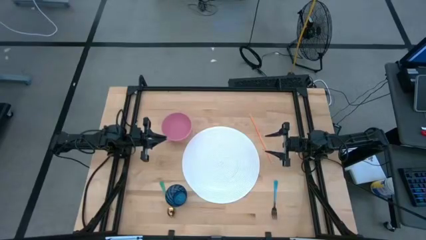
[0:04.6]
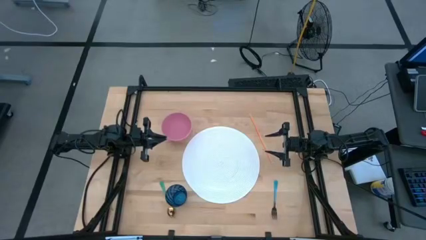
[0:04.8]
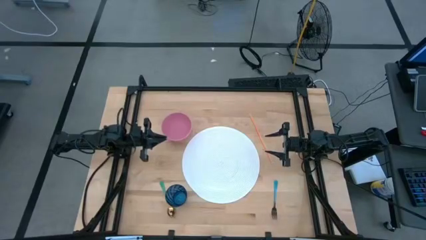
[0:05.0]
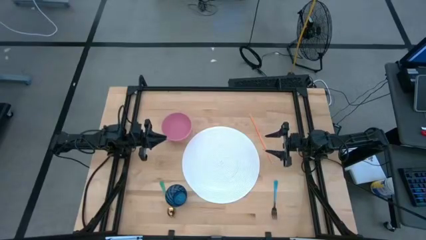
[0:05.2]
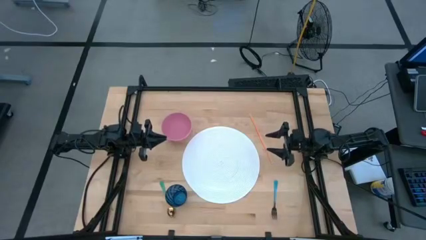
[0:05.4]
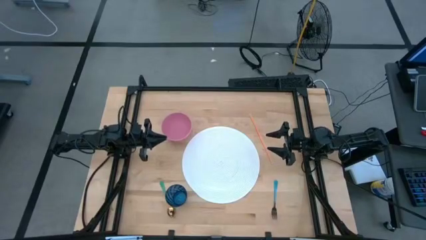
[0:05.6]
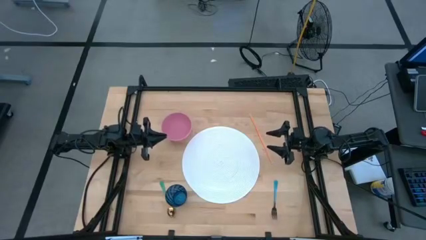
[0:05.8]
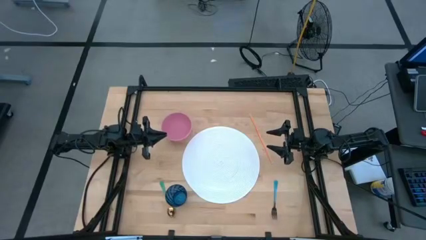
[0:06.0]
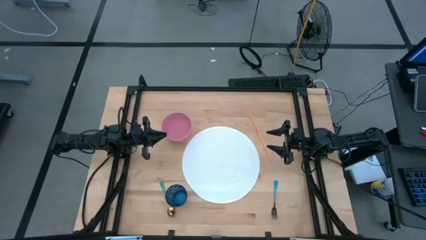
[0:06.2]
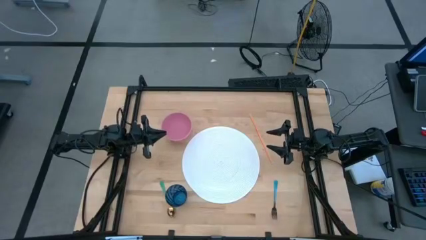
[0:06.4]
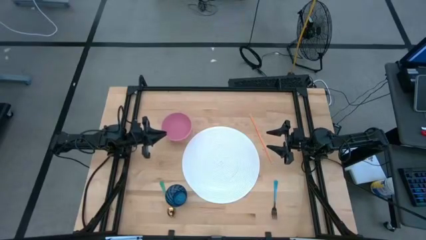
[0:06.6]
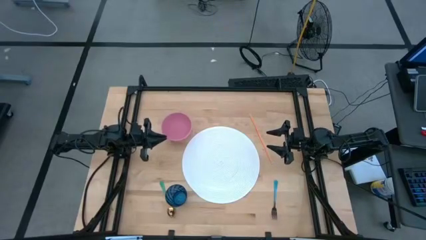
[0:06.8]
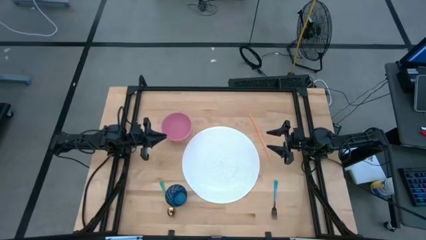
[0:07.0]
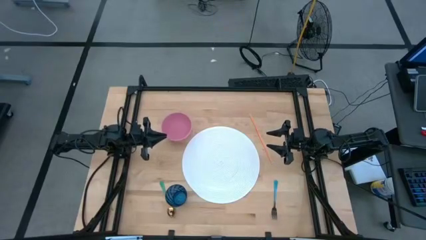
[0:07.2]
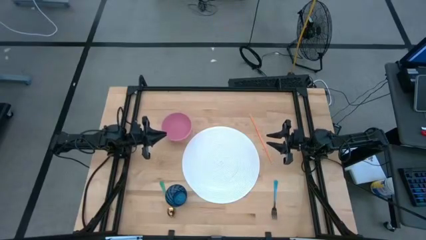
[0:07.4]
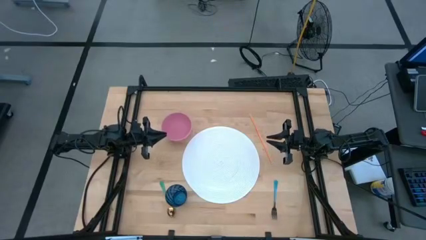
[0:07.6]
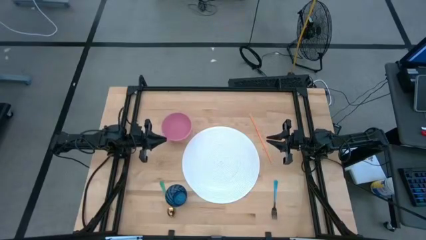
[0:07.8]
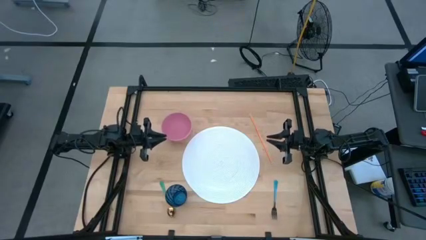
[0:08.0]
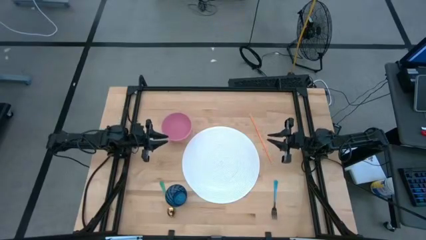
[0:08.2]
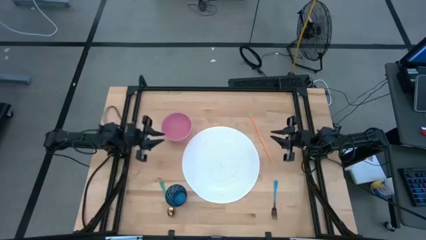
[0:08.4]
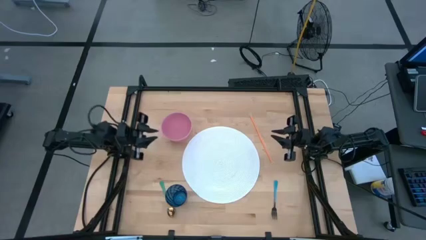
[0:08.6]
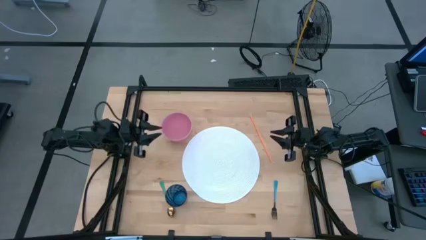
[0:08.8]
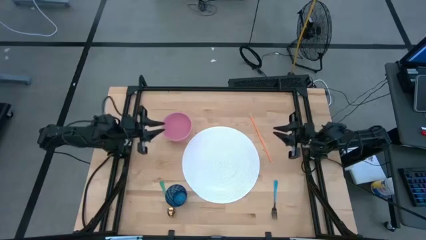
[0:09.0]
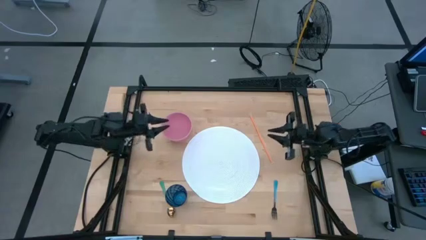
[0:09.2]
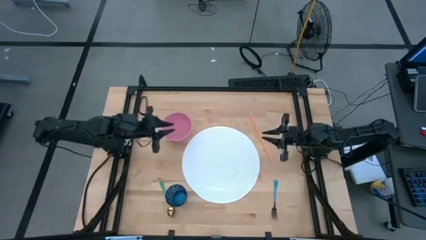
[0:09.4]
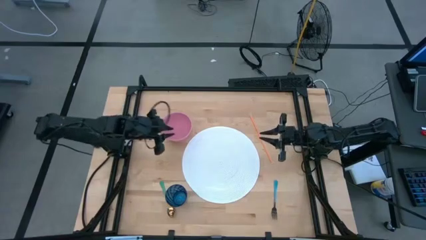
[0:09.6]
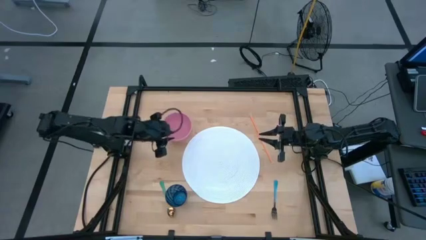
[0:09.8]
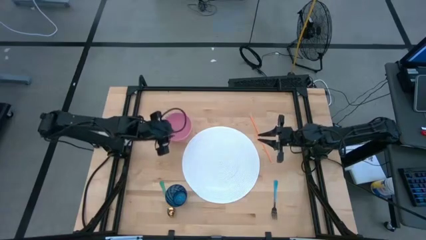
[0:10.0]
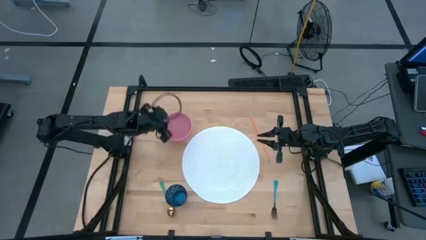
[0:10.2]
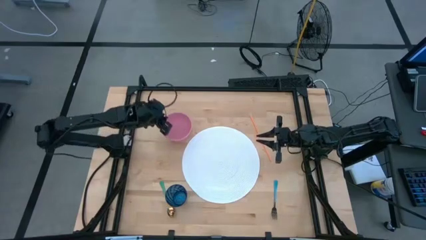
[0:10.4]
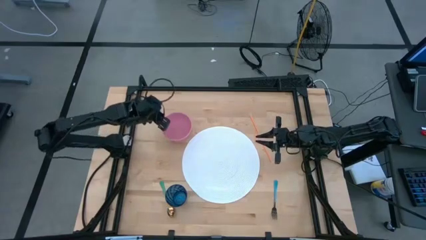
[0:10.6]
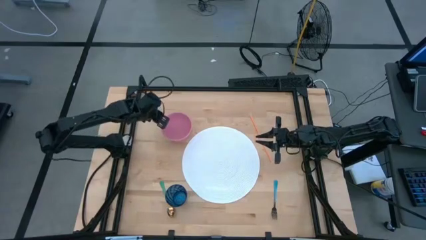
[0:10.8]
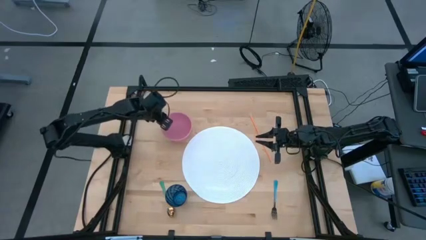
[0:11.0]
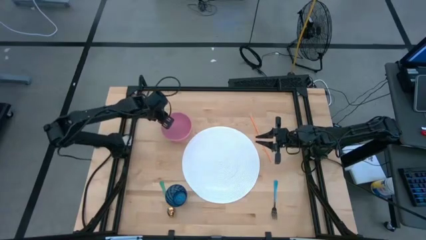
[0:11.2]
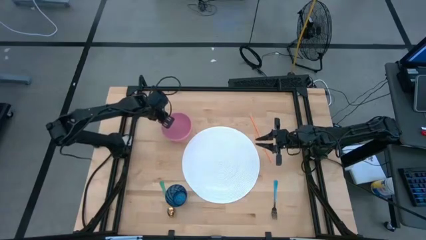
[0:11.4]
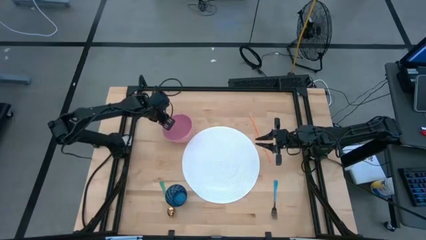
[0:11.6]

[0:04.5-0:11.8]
Task: Pick & Place Utensil
Put the pink bowl on the white mat

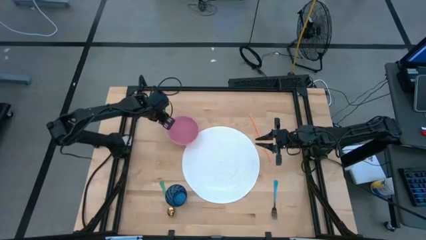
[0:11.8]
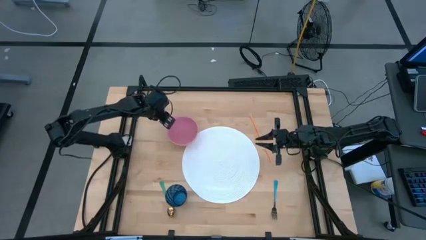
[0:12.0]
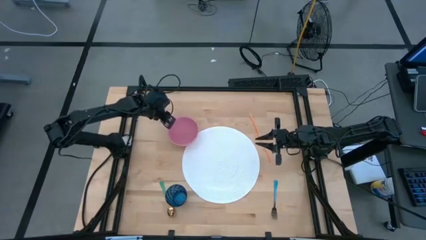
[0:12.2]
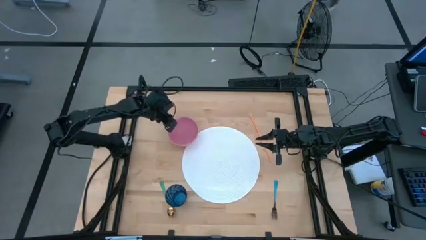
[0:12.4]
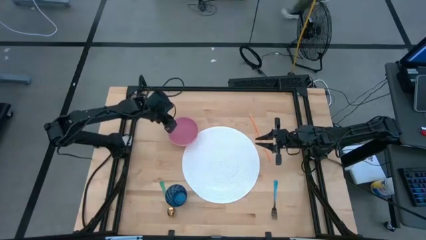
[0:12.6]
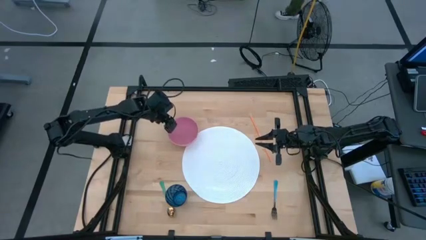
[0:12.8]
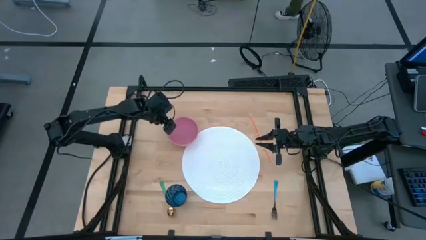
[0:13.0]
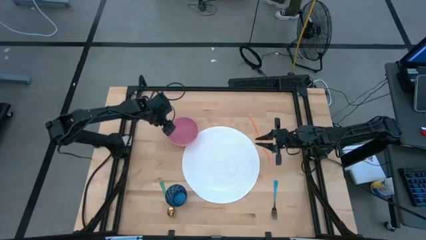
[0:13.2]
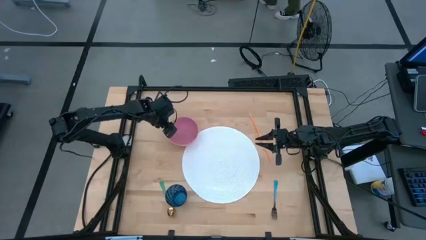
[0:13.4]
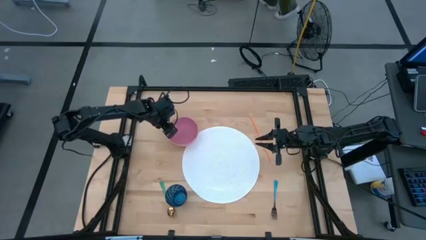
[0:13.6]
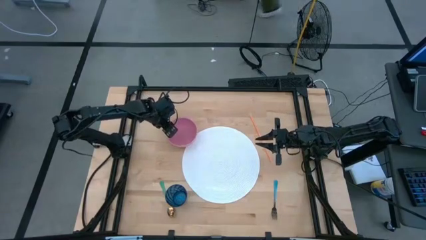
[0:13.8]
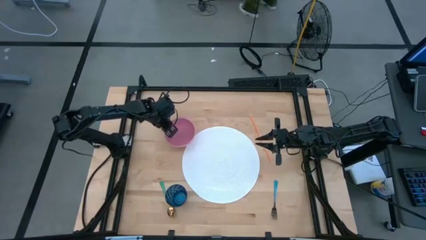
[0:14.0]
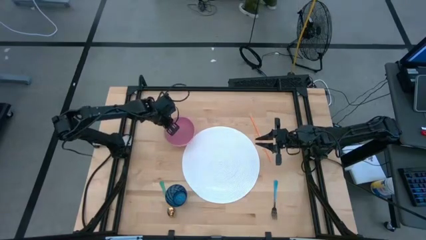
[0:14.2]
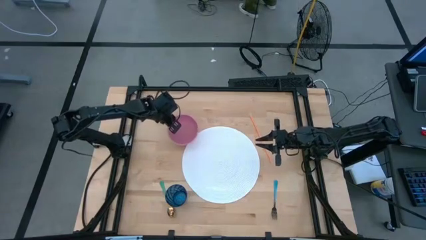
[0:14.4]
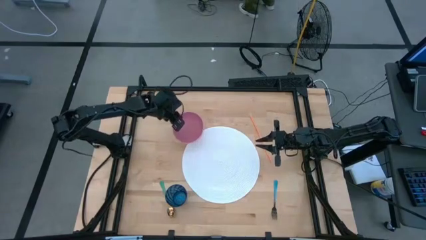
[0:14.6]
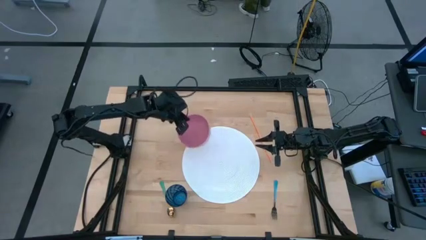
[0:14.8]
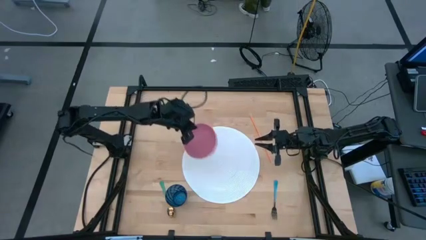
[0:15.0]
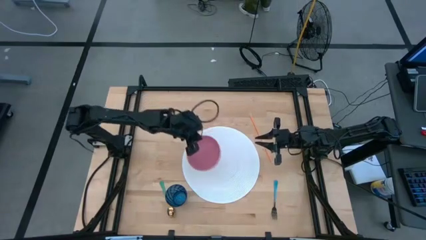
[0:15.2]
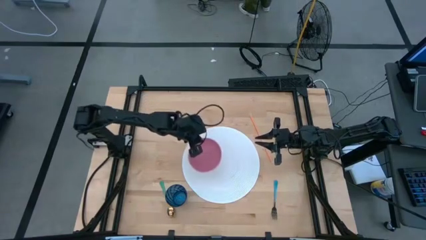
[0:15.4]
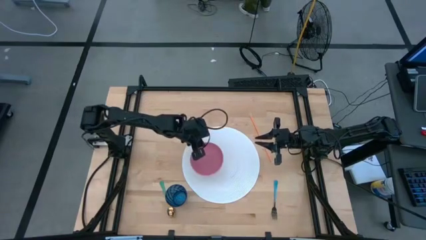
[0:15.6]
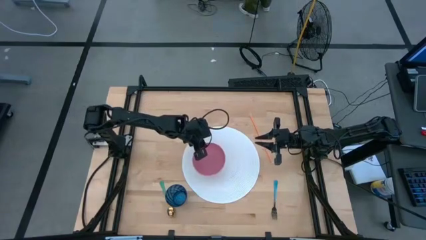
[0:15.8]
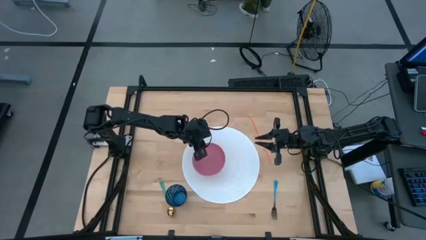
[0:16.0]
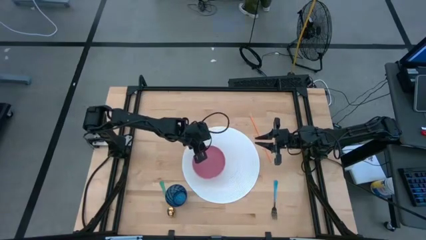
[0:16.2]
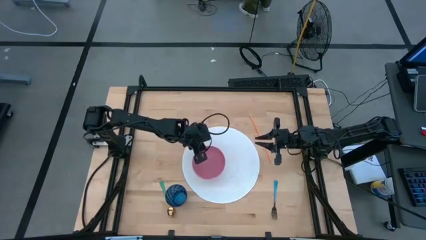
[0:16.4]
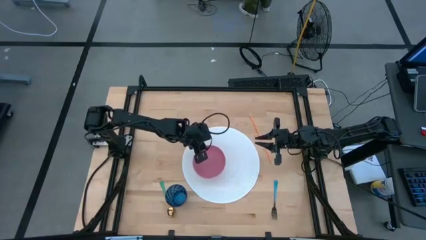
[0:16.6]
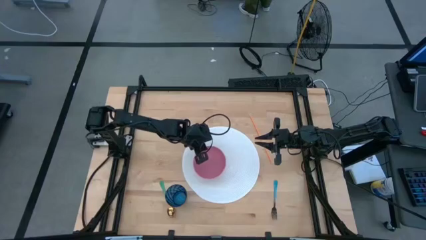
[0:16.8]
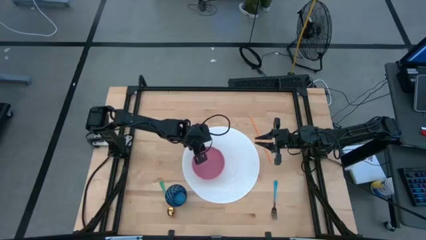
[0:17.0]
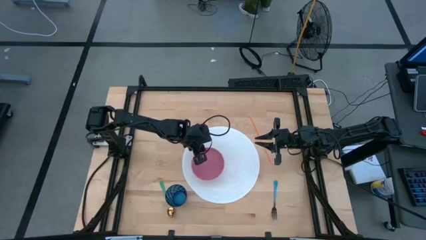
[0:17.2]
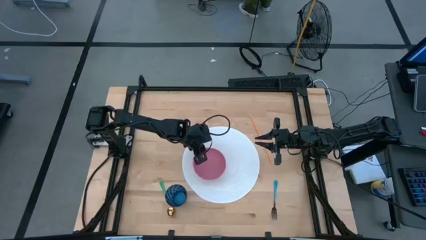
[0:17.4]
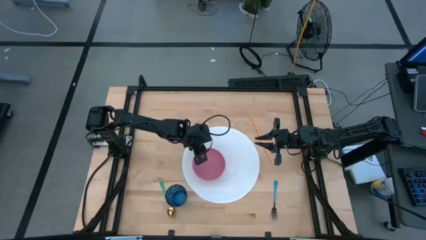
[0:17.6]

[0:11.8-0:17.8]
Put the pink bowl on the white mat

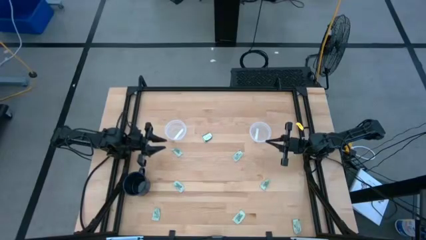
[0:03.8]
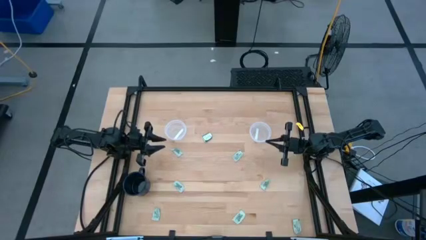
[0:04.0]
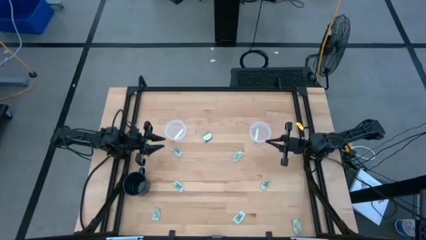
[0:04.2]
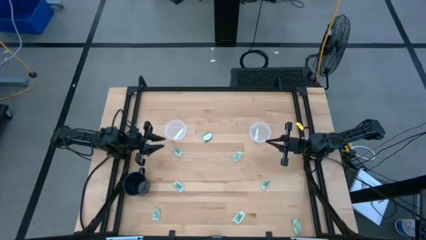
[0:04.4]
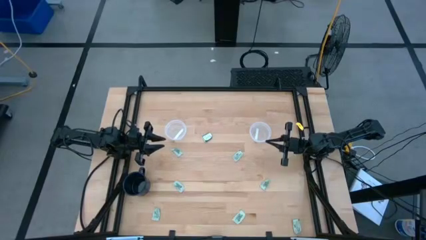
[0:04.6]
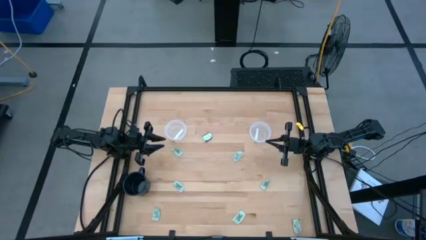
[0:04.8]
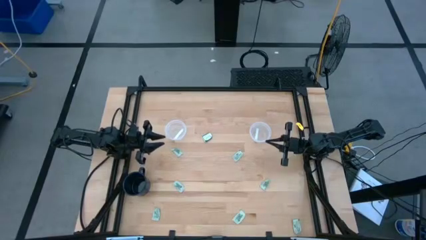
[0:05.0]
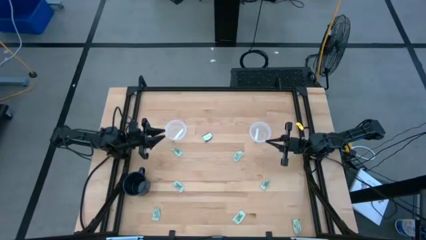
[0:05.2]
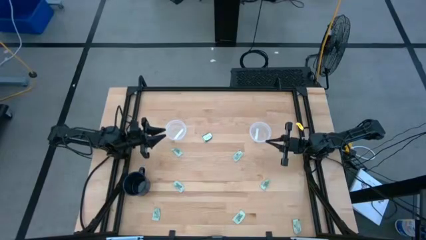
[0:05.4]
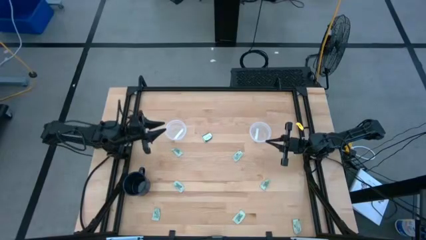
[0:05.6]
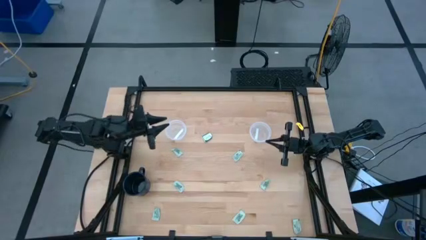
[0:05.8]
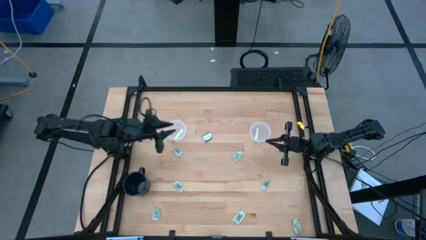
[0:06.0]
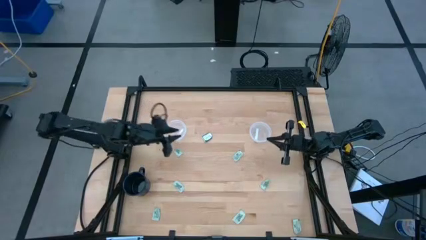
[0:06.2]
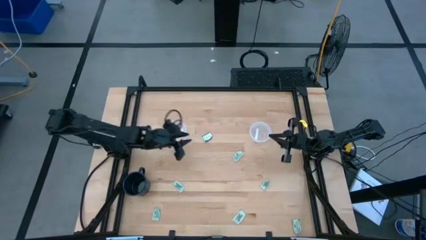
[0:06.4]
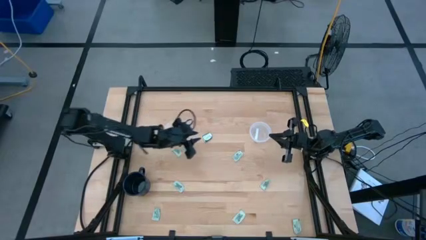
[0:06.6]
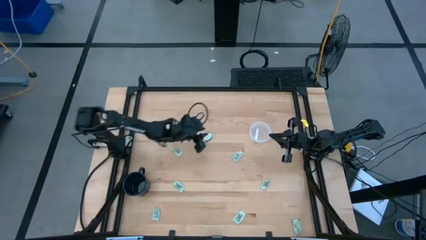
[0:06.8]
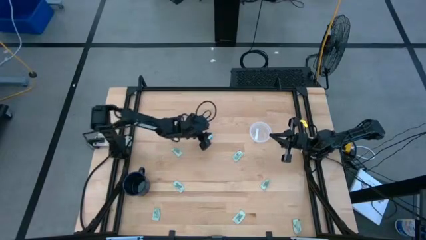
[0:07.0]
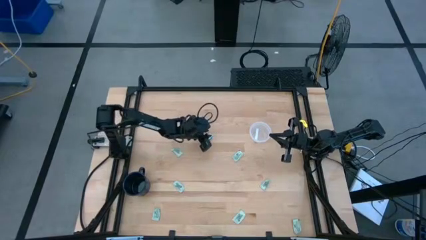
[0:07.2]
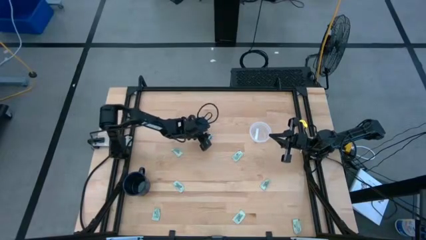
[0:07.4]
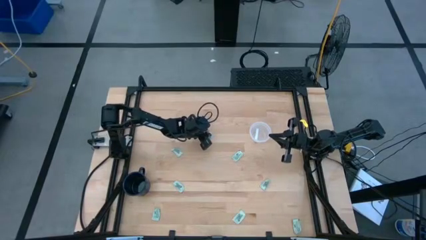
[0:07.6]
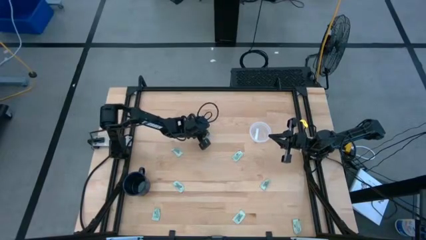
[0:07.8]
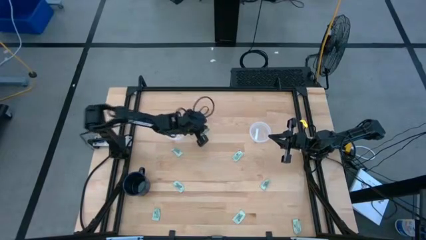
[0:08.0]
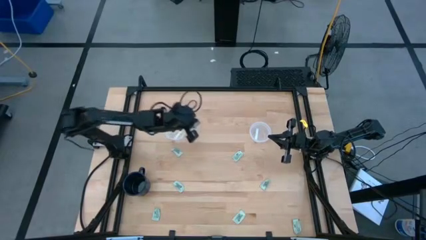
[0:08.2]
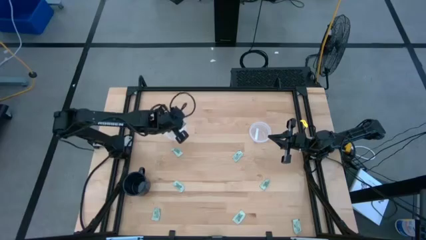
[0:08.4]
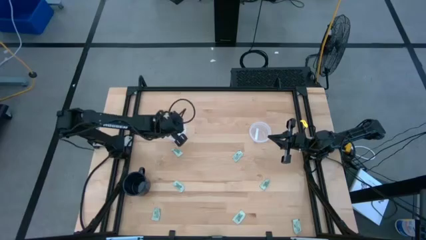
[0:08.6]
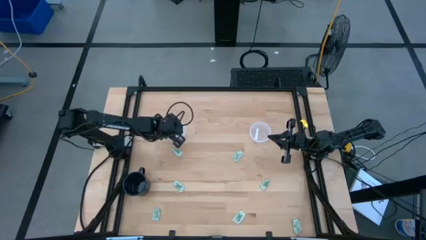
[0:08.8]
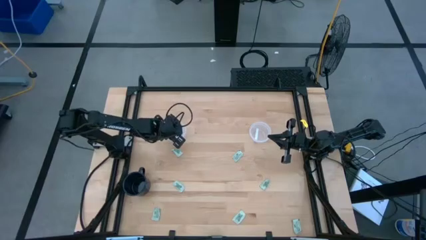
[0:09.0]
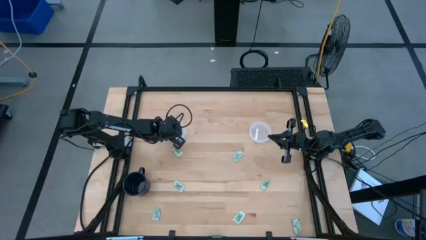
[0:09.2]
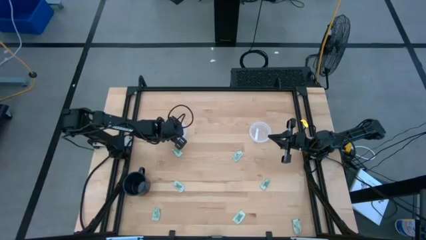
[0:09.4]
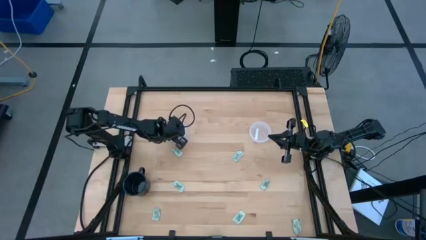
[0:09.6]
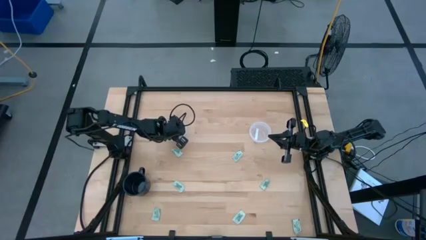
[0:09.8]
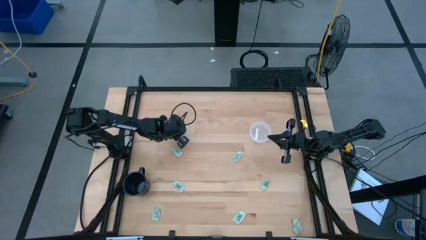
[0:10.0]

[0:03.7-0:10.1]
Task: Pick and place Stevia / Truvia into bins
Put the truvia packet into the left transparent container
